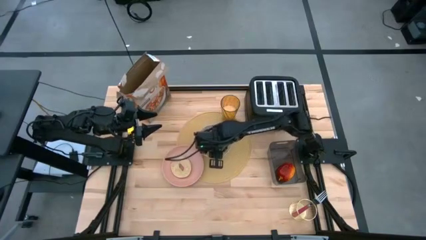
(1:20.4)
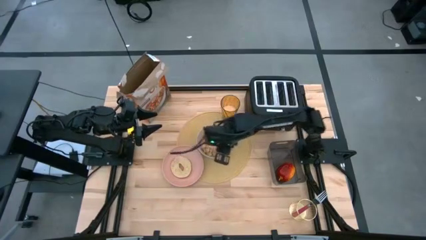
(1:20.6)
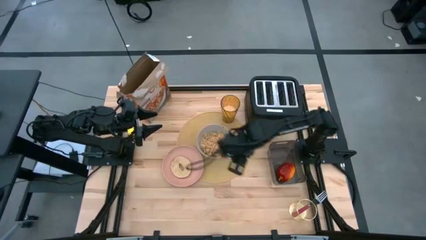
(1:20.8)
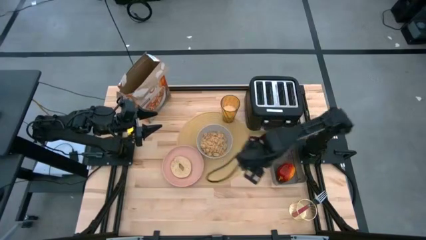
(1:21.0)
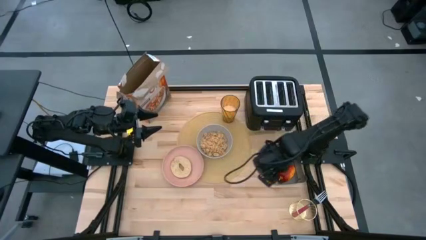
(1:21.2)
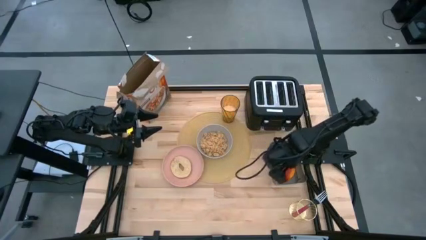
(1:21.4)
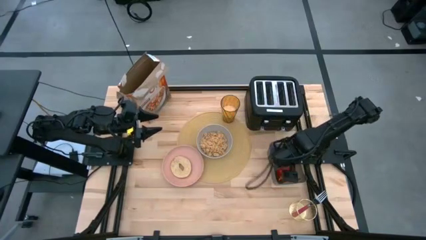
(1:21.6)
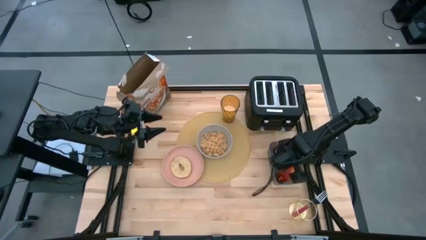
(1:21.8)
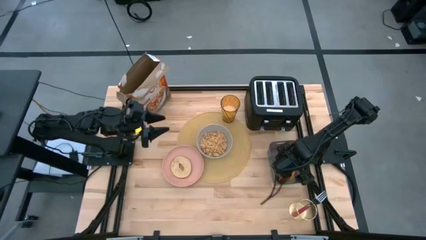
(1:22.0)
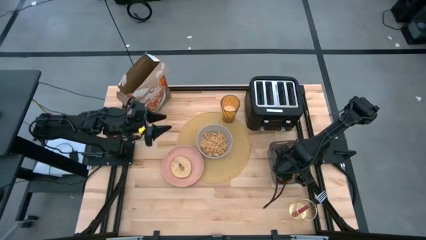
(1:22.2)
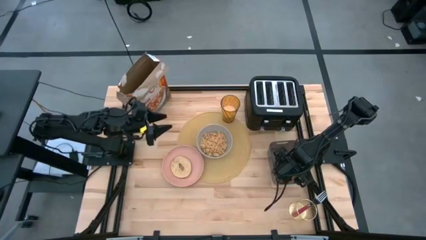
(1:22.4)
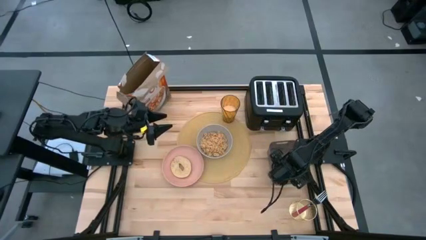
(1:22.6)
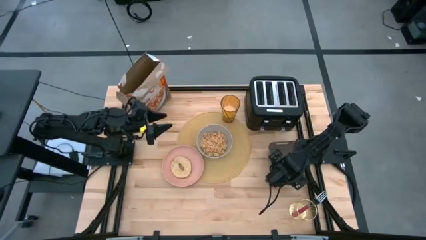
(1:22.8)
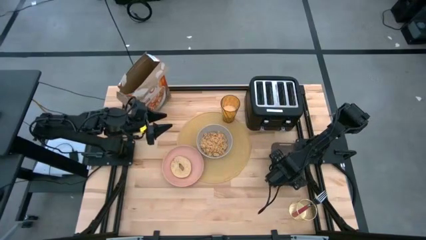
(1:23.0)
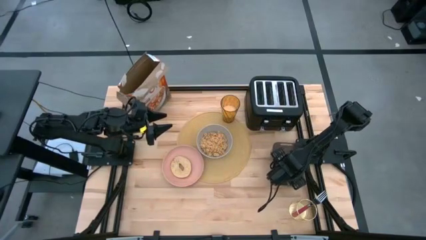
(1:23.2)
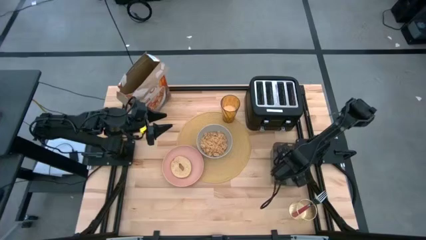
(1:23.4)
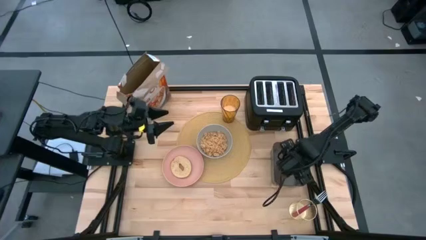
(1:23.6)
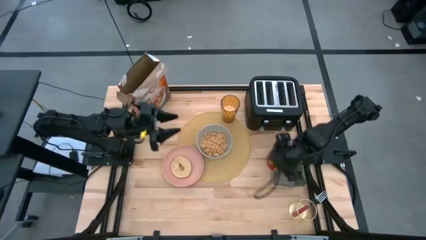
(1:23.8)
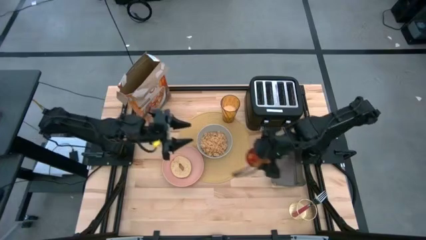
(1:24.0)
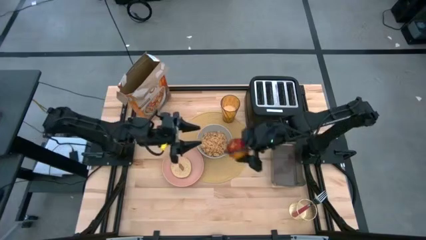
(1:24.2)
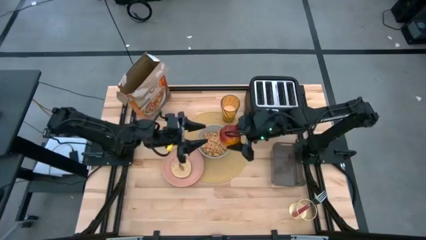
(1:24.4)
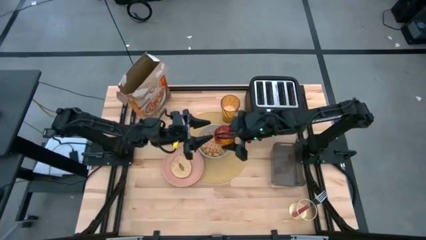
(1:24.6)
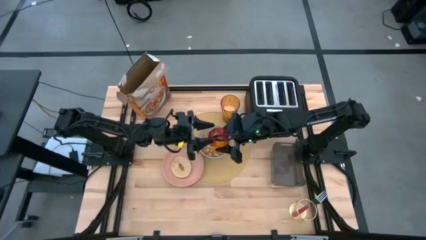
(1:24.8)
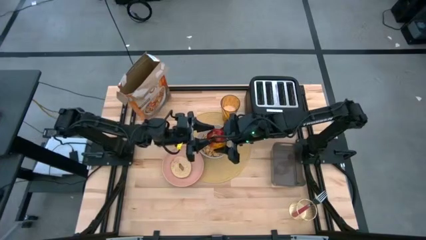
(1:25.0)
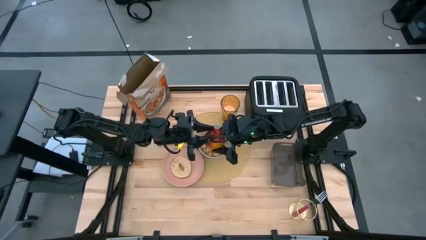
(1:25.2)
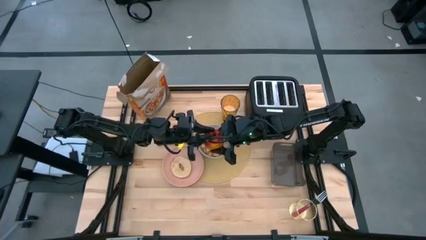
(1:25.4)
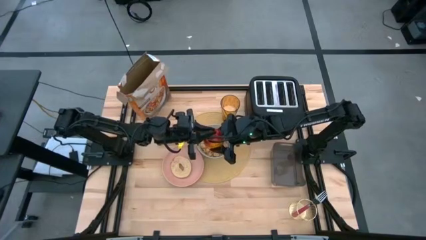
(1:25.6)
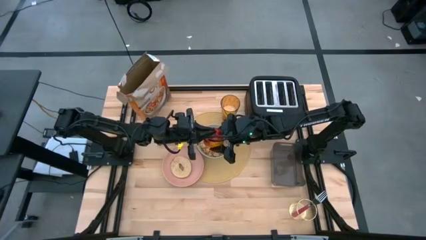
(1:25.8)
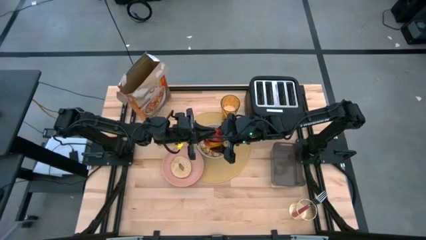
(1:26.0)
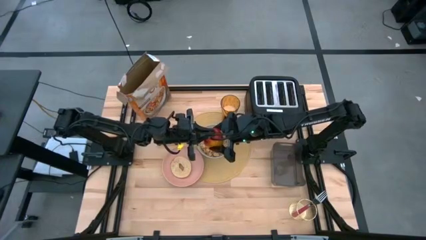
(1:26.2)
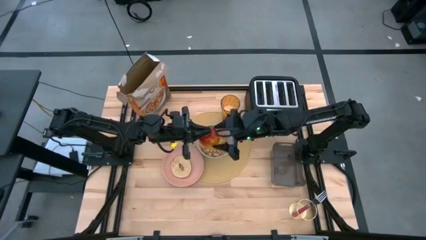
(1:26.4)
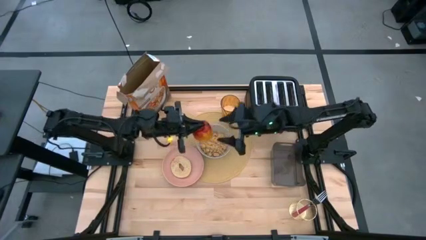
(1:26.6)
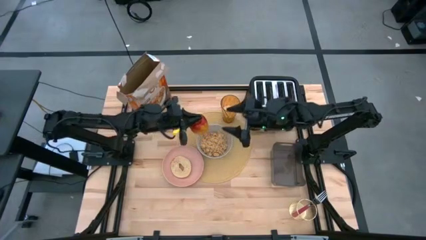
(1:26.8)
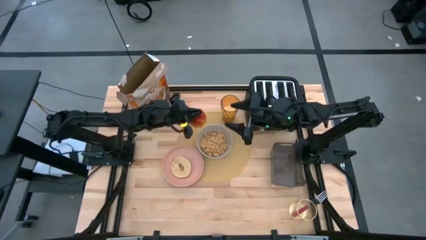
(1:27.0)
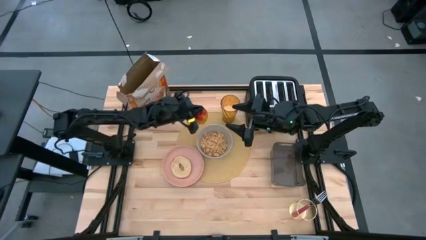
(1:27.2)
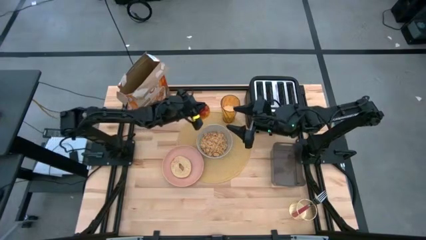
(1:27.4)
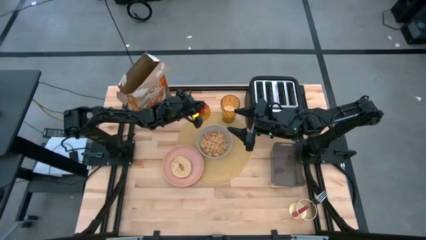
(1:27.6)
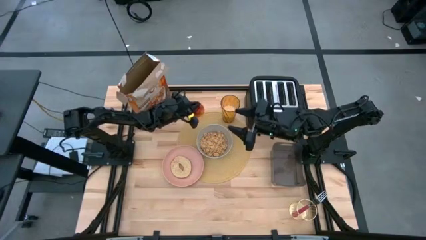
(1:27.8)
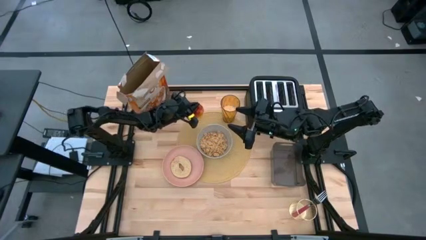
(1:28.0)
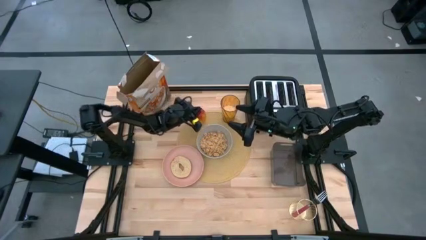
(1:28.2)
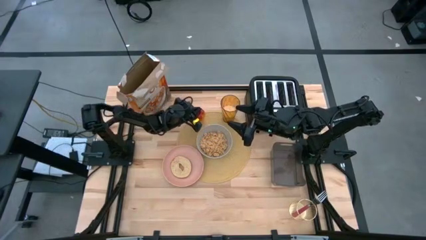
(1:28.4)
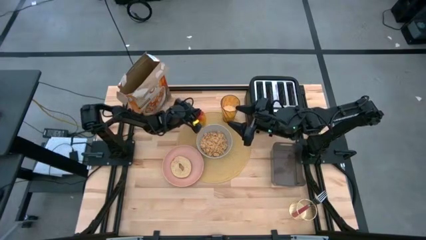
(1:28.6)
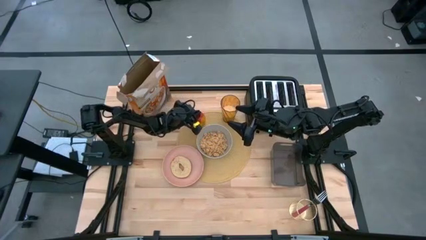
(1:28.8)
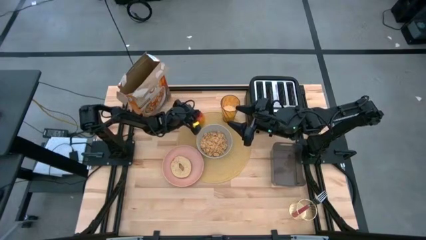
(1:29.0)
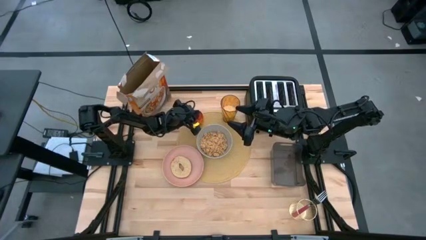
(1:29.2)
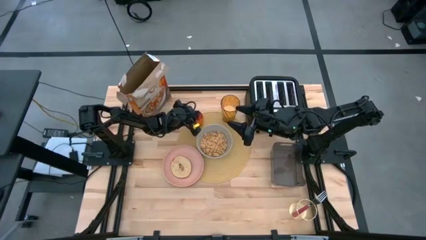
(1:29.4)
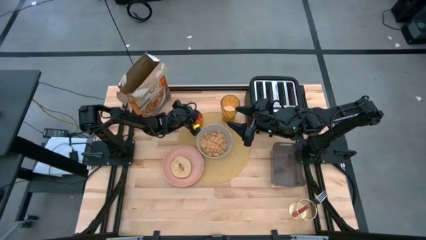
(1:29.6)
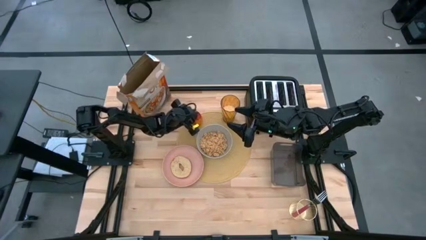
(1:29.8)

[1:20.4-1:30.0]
Task: Arrange a breakfast setting
Put the apple on the brown place mat

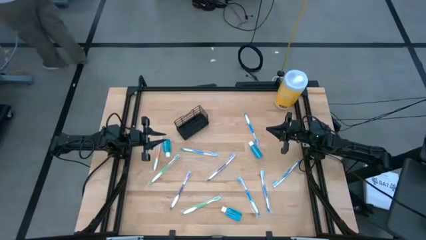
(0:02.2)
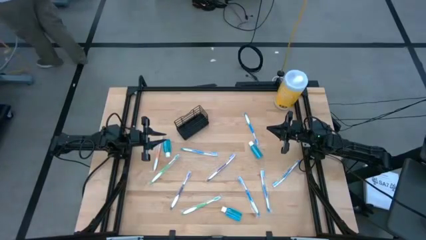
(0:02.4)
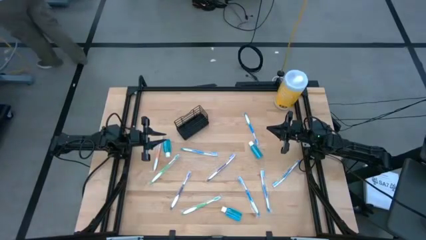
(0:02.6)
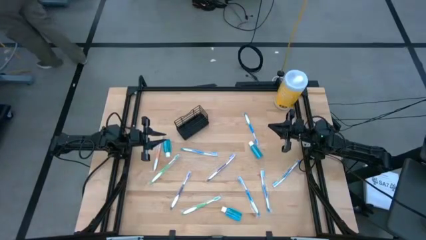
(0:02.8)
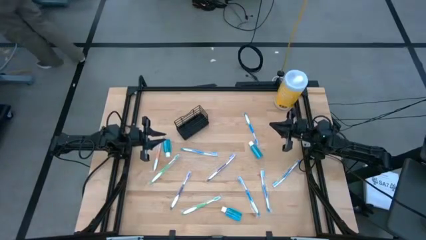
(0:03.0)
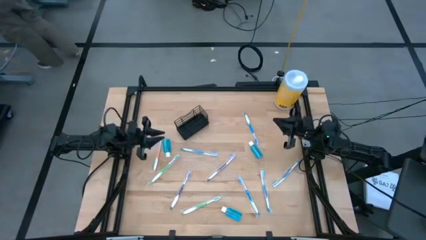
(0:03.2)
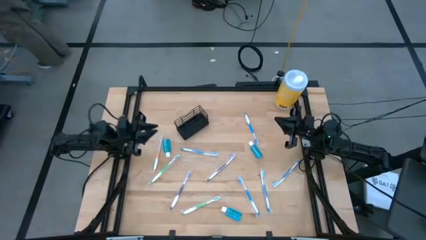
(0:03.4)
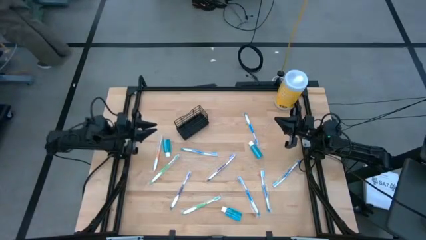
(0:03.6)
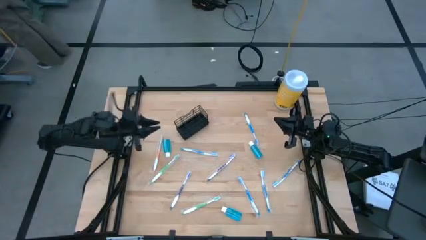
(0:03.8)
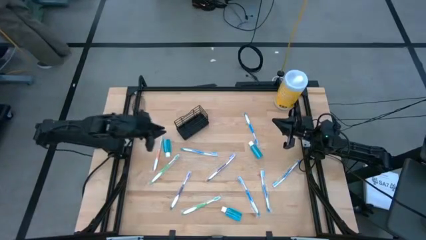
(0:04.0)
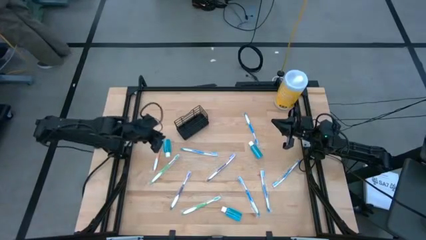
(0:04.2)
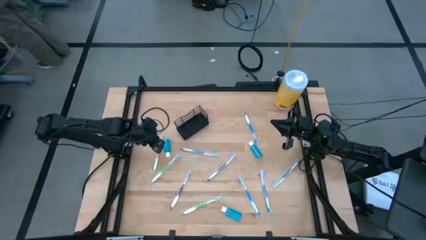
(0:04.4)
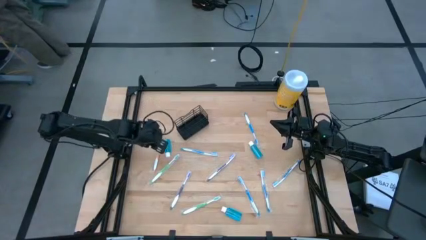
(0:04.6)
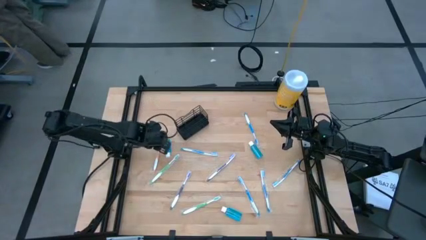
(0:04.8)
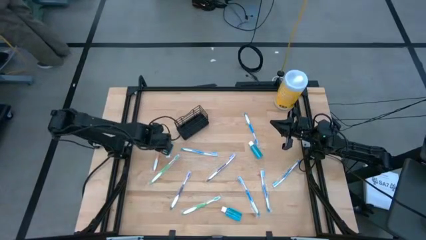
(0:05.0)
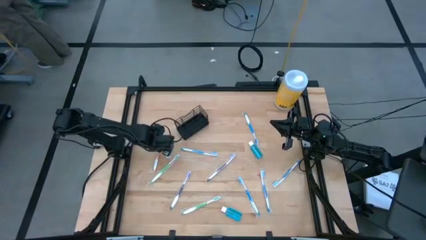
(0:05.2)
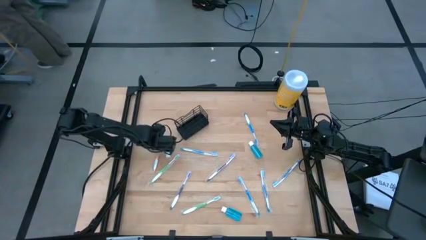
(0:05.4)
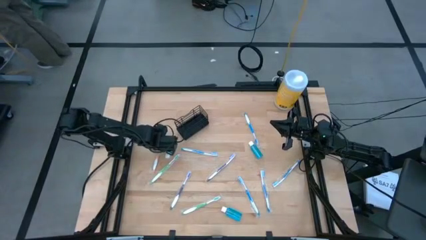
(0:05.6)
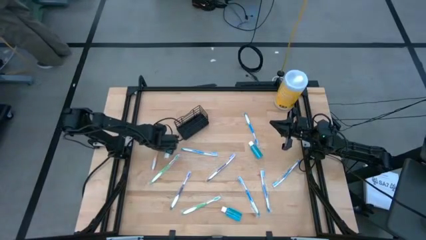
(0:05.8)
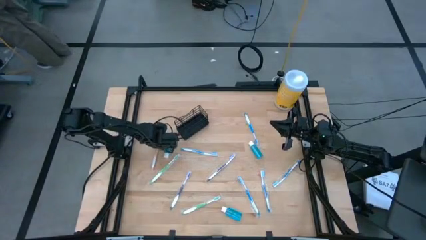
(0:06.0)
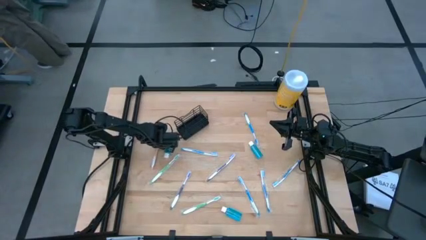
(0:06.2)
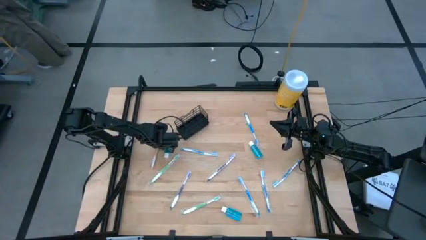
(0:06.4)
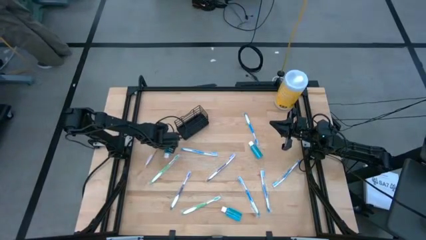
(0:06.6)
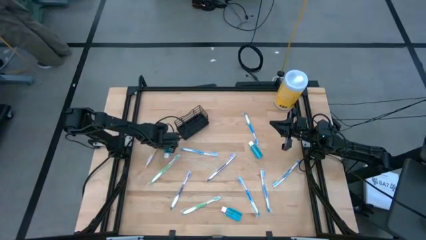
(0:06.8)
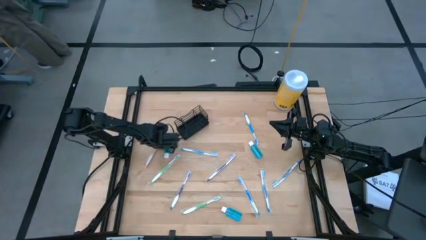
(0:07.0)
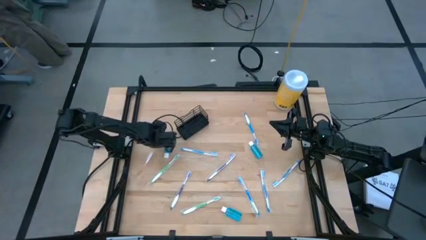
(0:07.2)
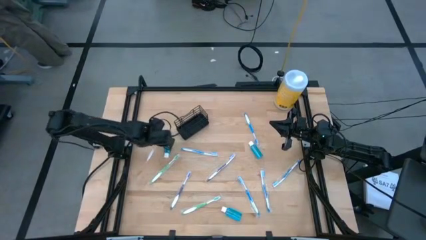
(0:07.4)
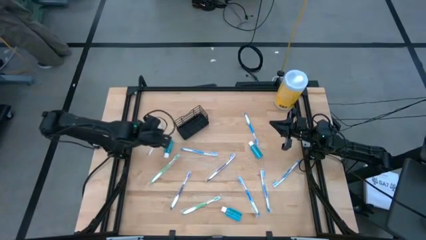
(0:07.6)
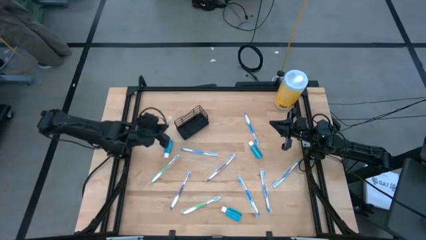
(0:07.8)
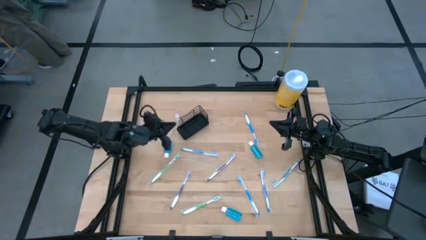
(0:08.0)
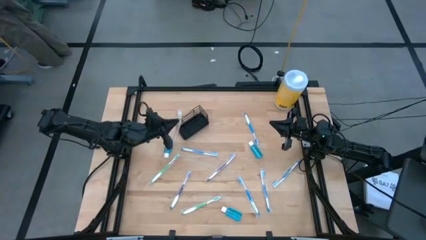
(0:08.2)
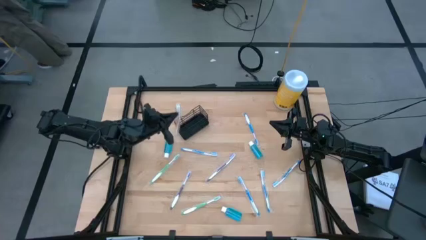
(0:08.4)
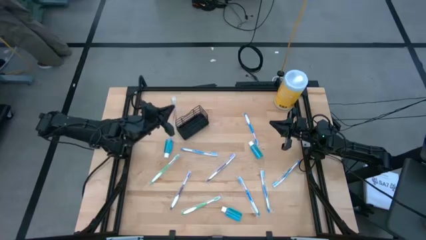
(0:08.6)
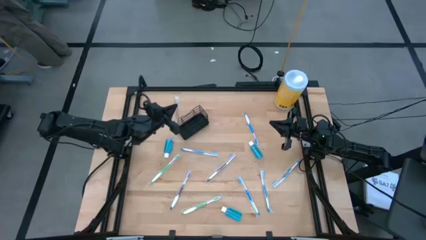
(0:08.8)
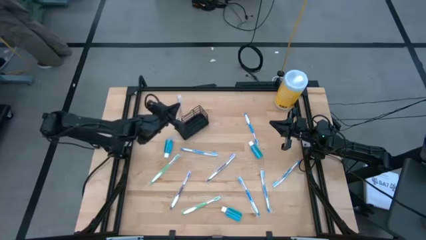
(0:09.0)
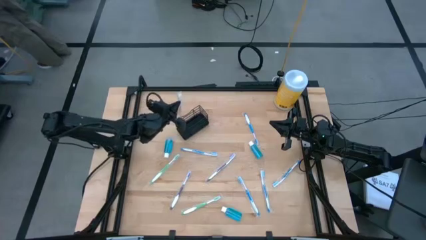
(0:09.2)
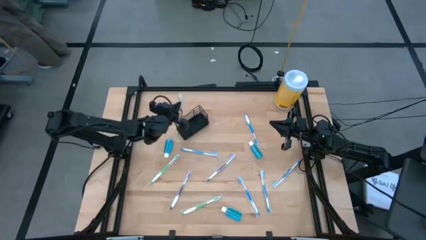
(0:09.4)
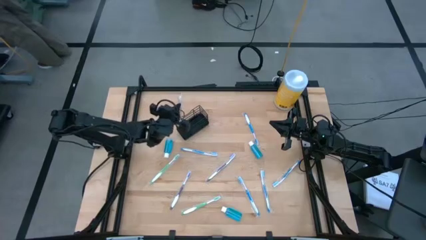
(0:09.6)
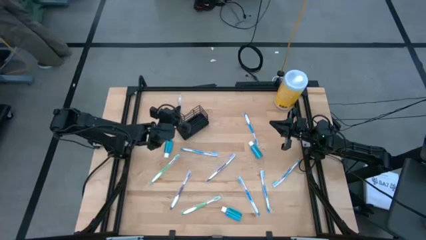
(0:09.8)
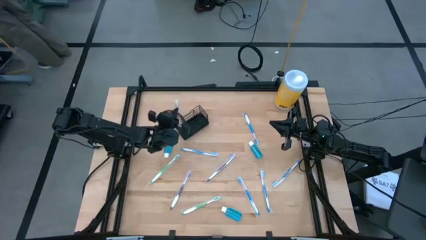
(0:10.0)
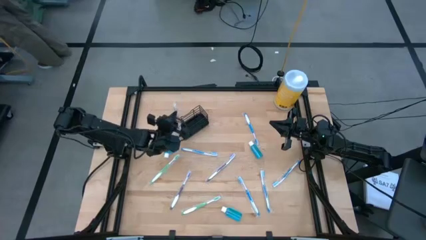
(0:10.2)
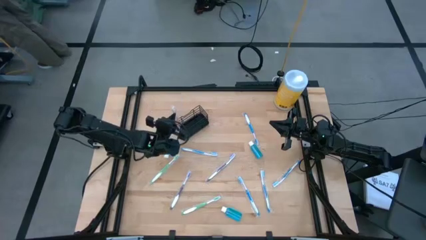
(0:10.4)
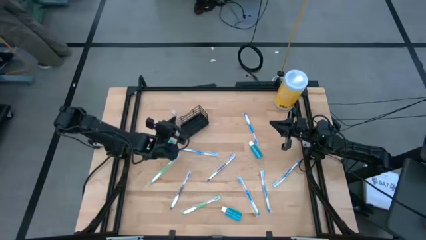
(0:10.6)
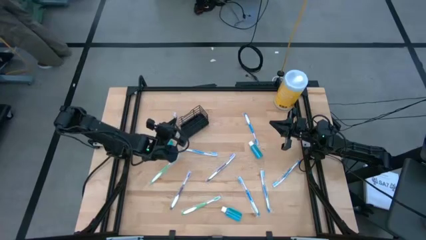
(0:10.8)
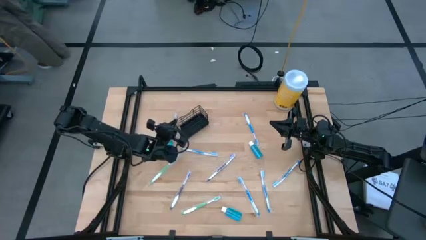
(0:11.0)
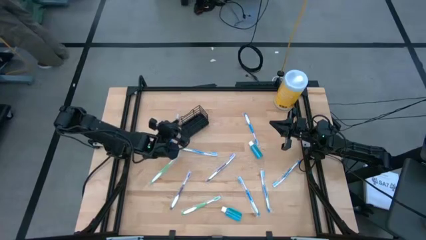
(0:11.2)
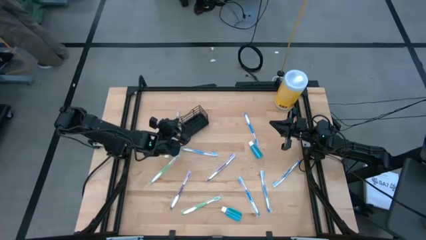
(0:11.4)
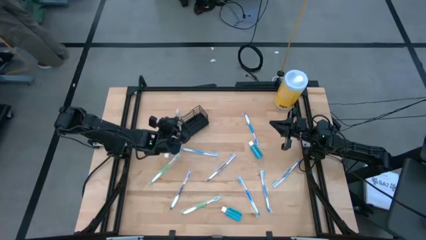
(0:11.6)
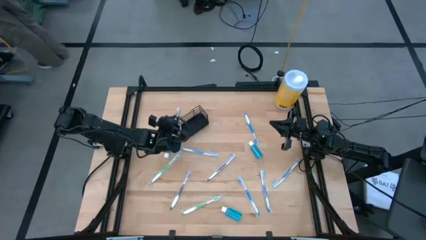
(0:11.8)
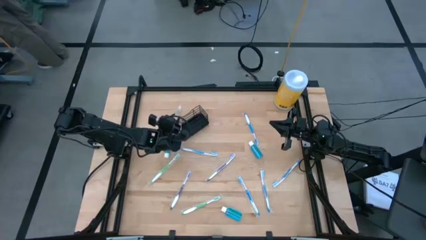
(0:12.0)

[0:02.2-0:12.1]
Task: Pick & Place toothbrushing station
Put the orange toothbrush into the black wire organizer
